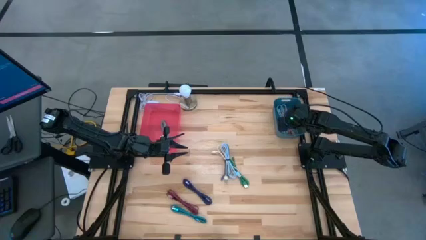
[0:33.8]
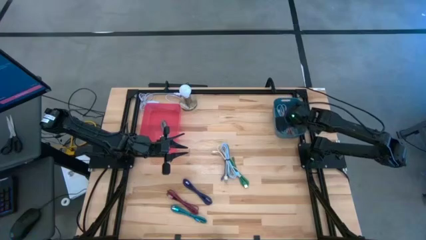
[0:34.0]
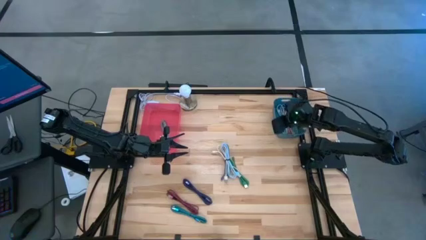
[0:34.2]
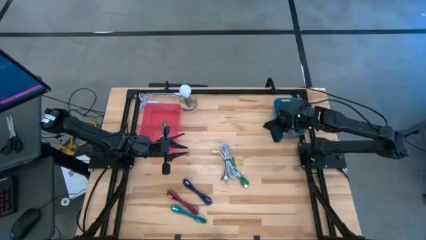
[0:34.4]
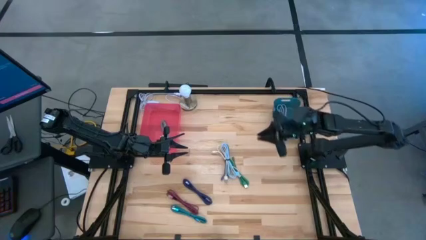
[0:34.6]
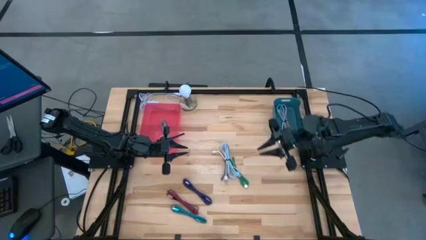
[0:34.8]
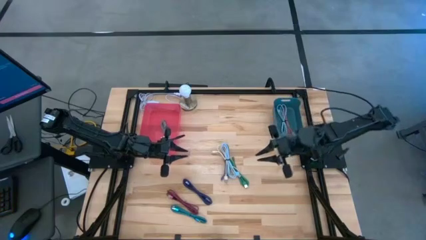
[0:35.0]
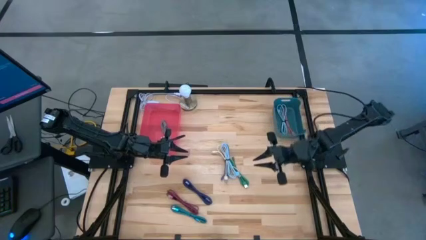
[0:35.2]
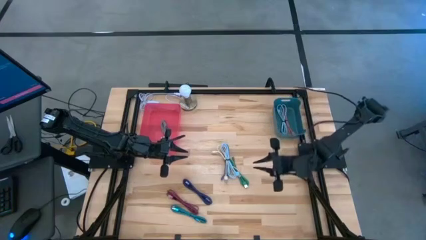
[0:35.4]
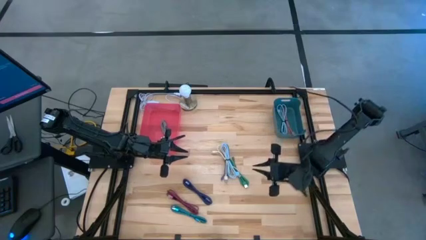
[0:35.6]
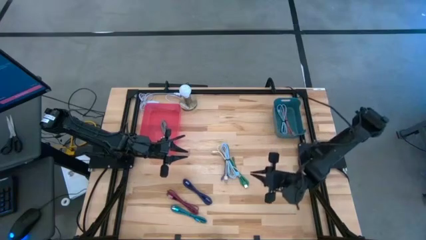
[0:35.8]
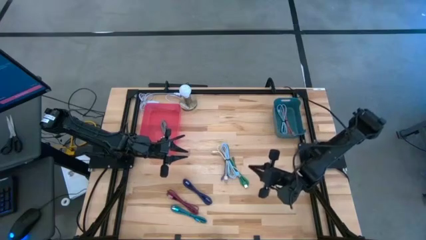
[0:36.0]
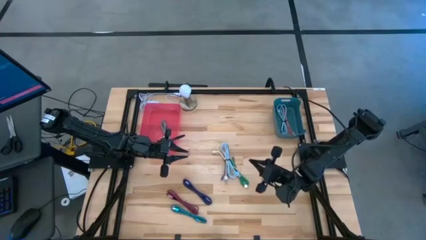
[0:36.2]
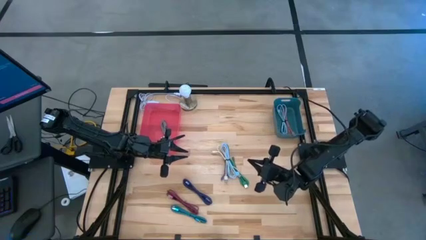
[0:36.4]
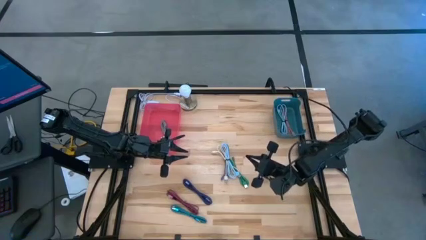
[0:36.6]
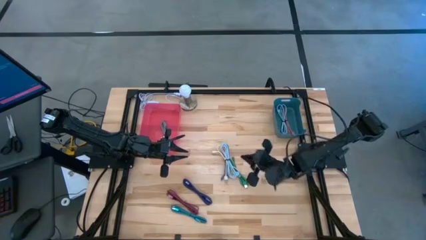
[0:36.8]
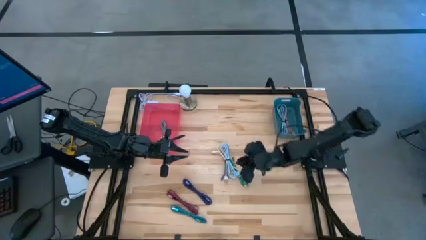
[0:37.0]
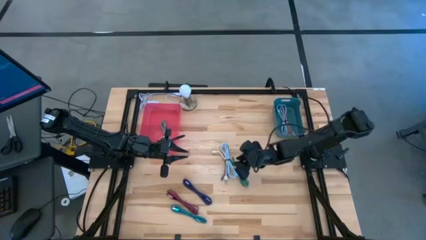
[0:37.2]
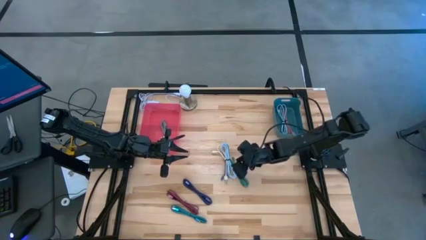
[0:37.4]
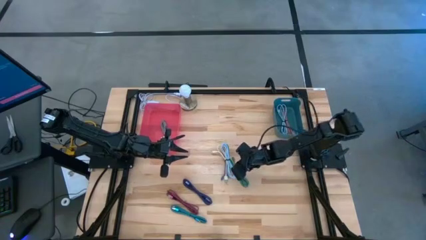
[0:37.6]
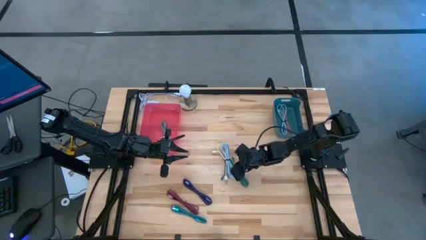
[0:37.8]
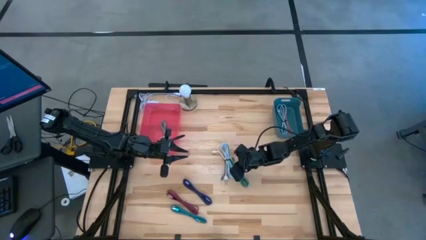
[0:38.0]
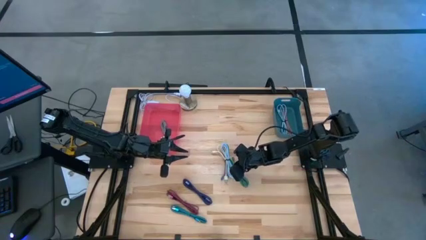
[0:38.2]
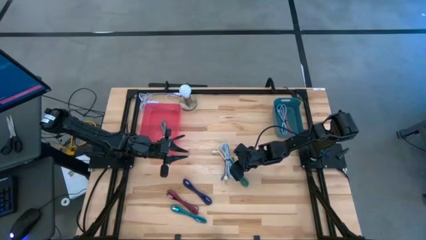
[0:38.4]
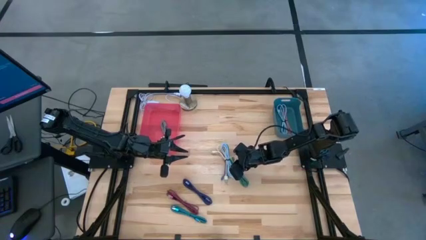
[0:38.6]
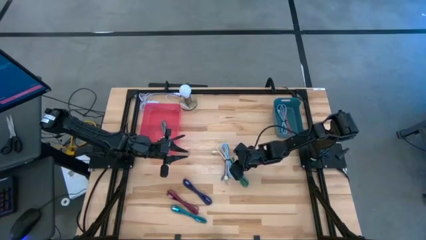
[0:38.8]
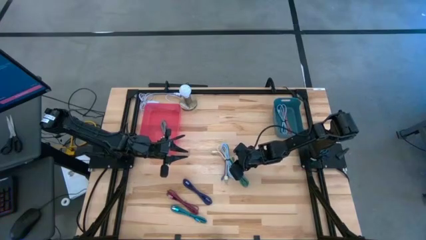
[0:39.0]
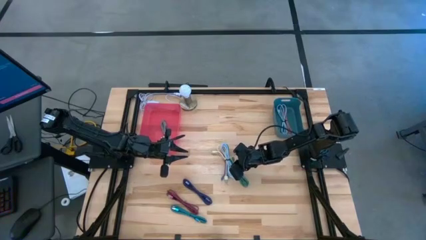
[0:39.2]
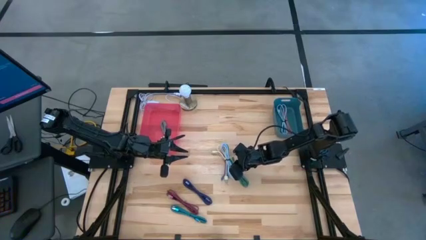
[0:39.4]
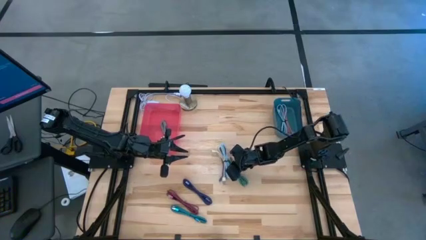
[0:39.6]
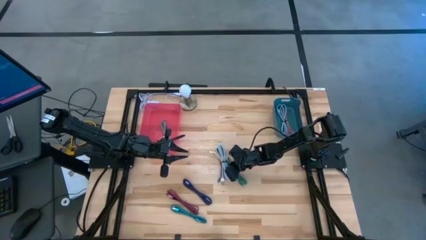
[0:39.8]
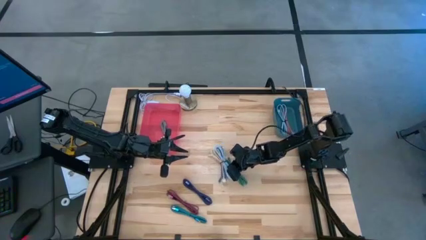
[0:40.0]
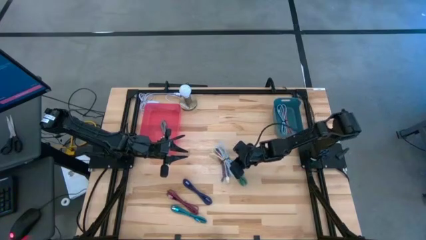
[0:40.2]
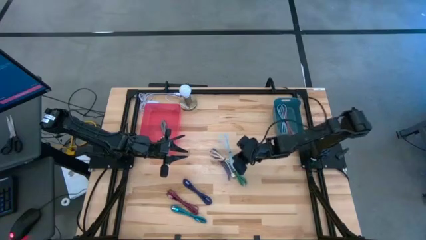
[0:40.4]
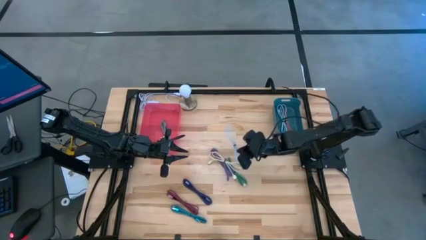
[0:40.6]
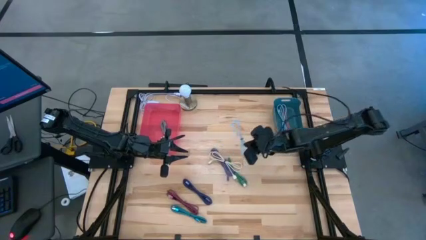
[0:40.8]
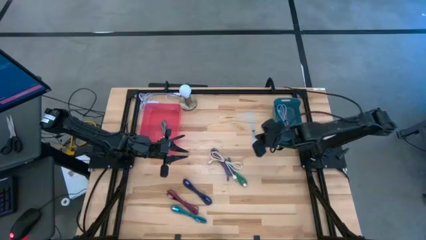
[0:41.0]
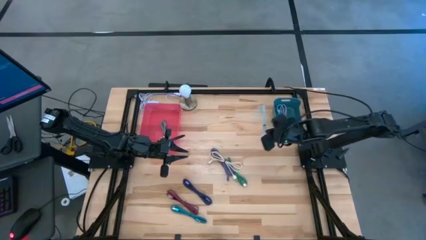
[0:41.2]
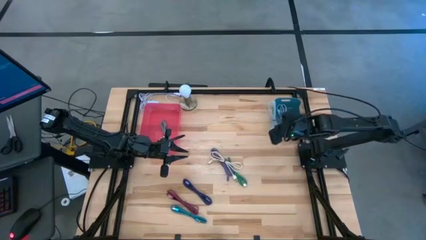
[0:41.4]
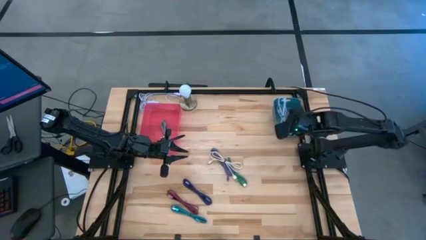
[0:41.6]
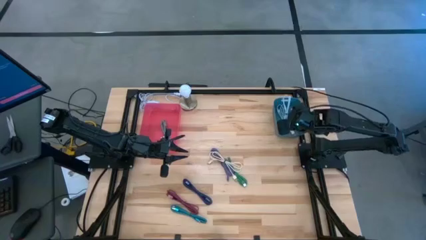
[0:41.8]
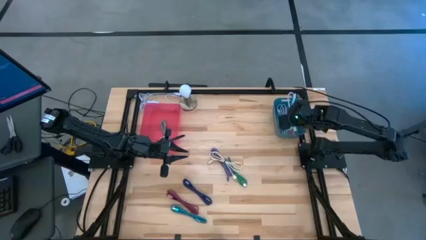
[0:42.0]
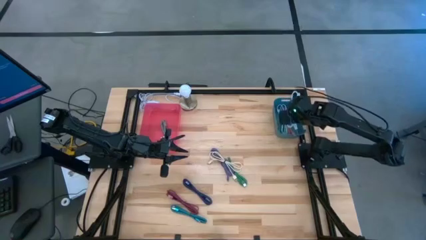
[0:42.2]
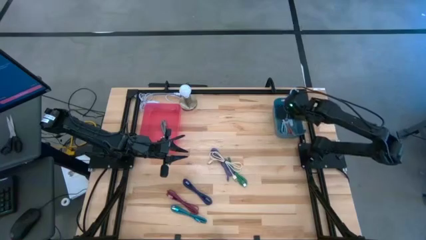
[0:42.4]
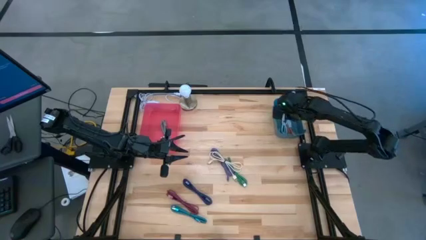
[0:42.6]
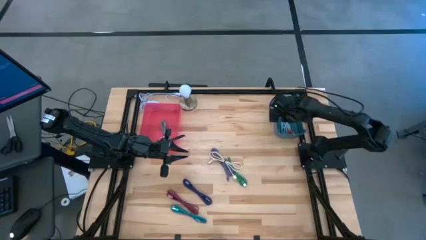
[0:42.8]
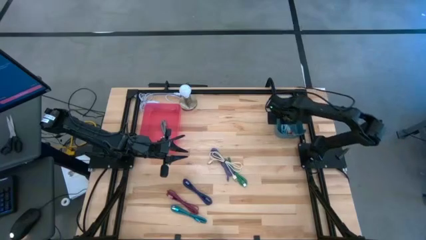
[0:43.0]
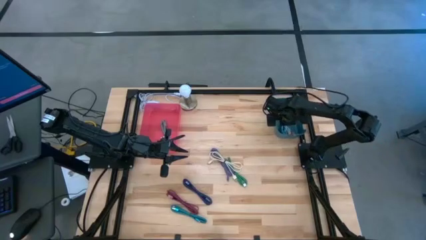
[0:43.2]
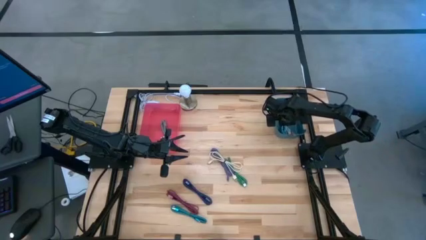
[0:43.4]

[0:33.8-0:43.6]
Task: Pick & Place USB Port
Put the light blue charger cable into the blue bin

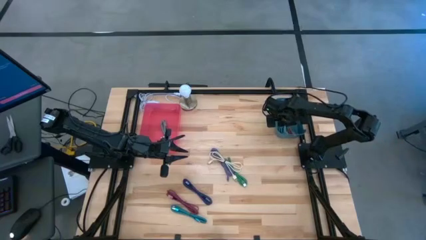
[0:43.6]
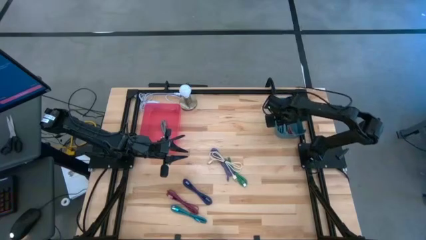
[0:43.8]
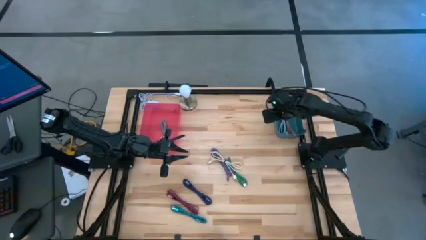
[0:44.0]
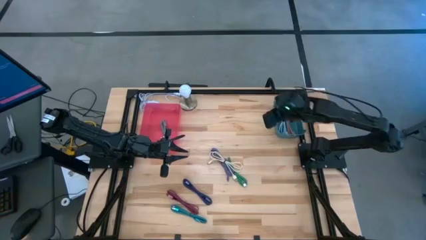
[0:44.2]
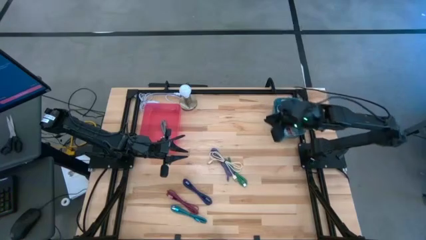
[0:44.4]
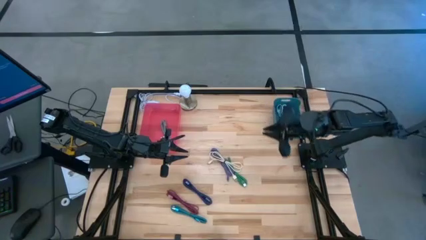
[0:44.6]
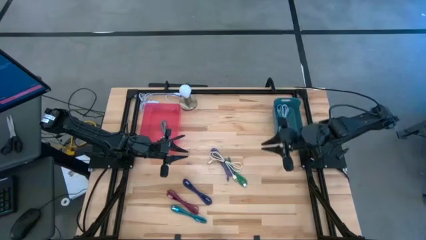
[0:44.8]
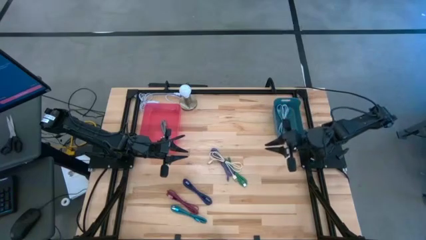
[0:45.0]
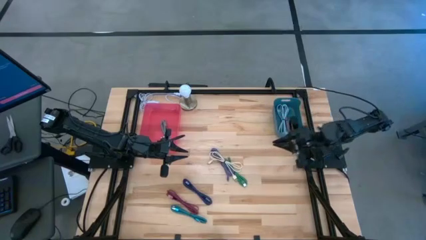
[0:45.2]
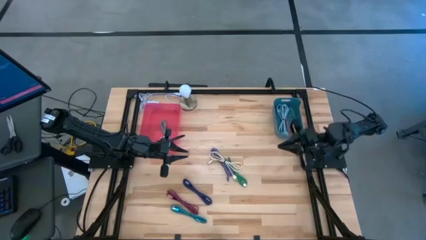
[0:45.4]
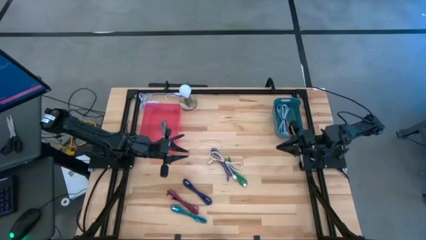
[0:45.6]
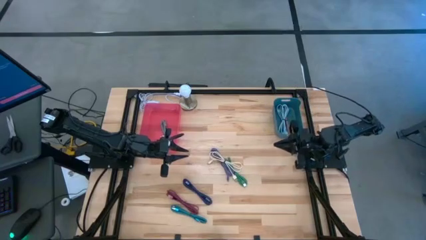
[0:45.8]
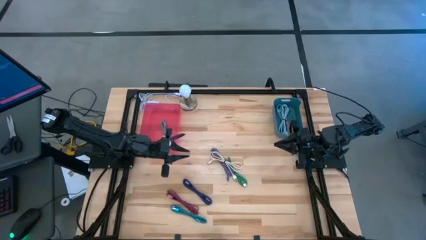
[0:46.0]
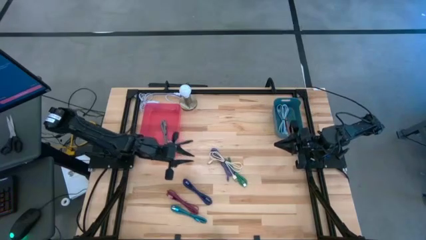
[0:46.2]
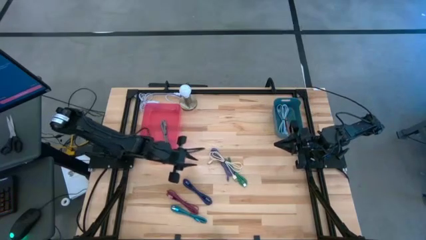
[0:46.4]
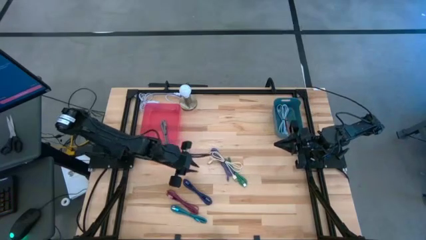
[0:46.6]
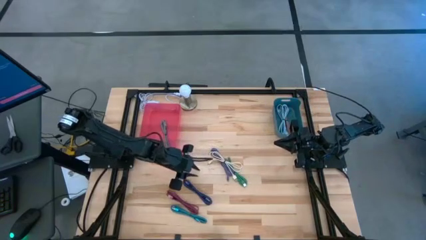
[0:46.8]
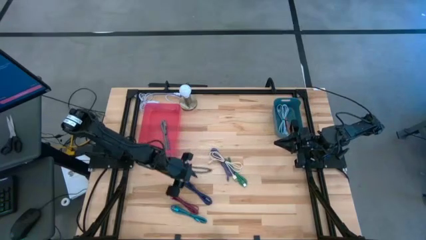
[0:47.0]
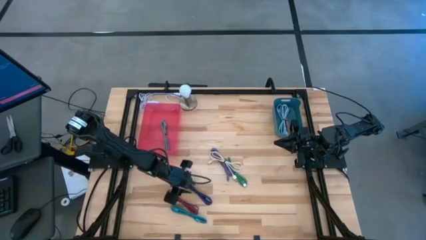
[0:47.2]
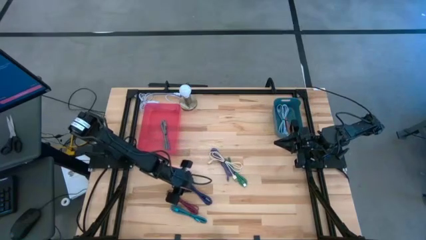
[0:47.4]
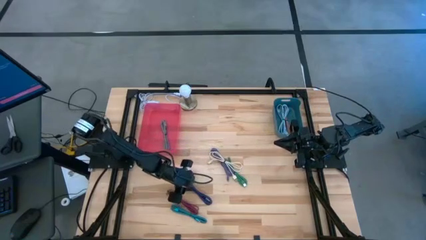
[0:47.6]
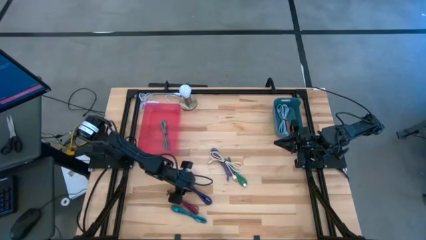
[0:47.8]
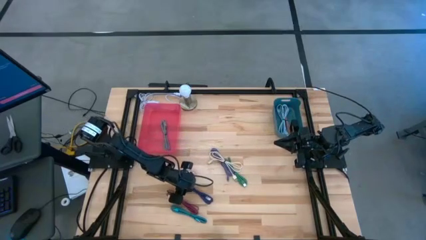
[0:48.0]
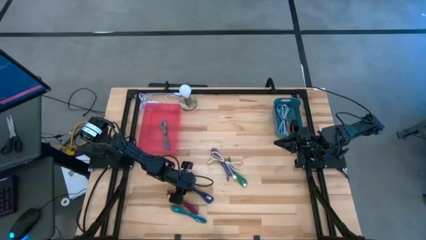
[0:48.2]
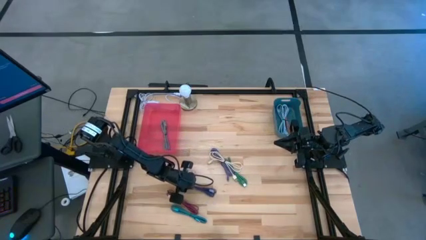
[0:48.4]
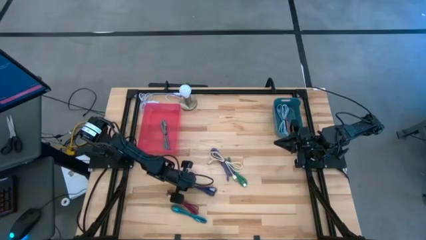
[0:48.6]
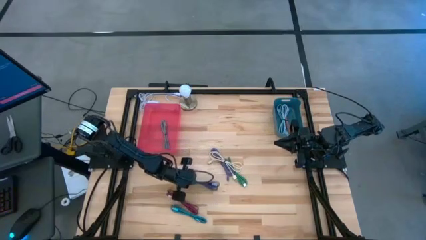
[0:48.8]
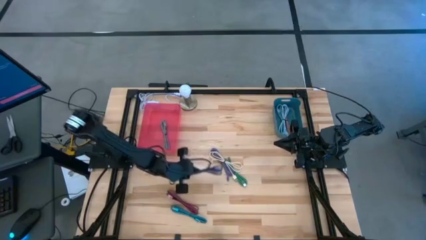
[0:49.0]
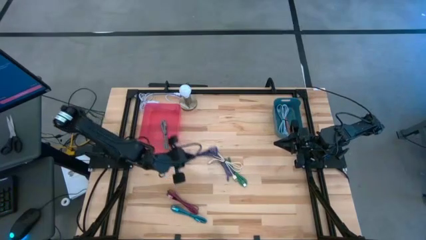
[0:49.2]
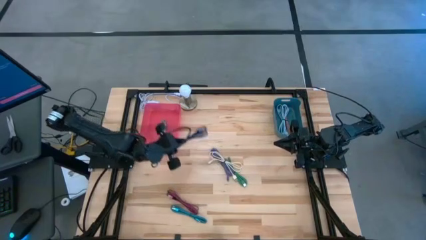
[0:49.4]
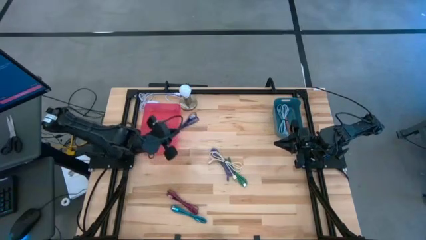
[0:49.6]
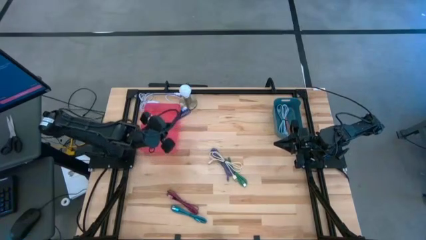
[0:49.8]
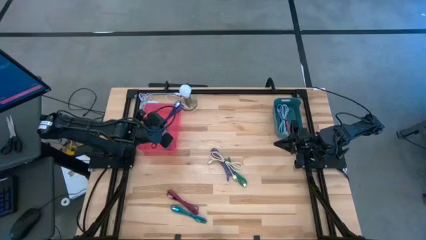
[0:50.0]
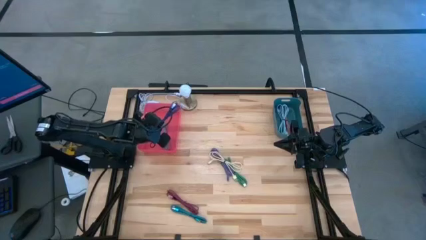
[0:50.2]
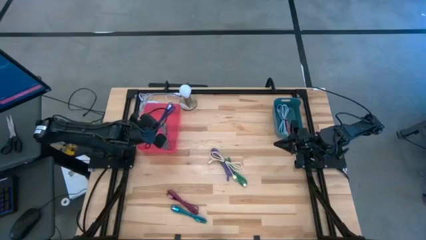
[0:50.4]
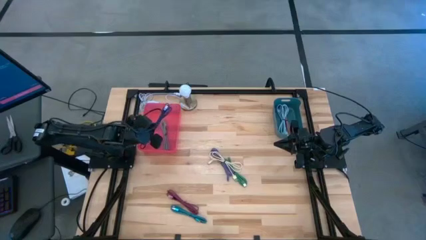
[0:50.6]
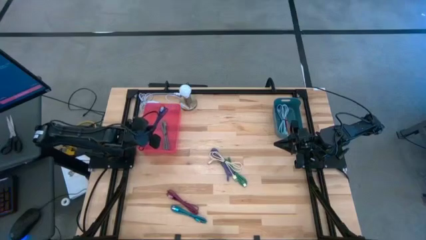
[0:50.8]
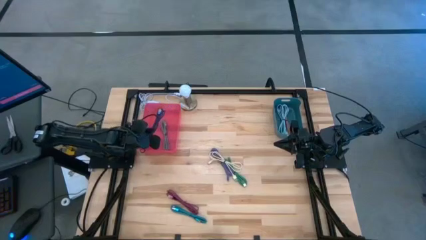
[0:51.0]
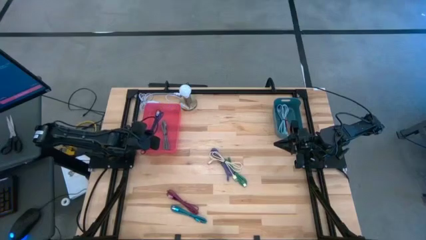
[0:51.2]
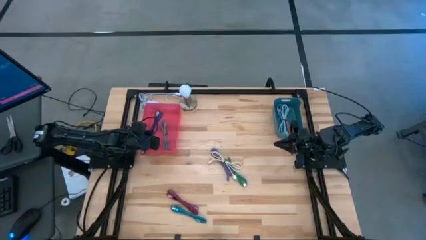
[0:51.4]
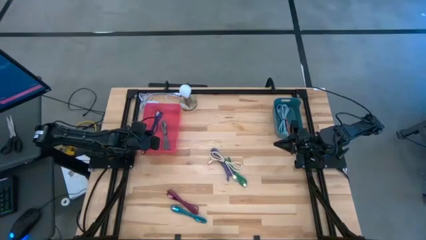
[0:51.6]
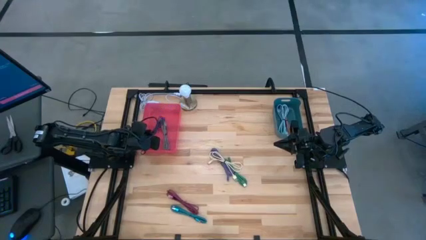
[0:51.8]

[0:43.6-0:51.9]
Put the purple patterned charger cable into the pink bin
